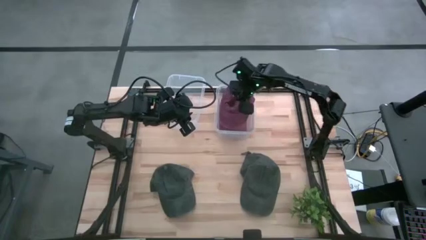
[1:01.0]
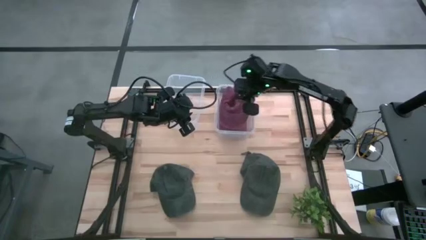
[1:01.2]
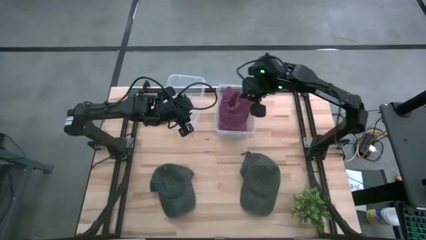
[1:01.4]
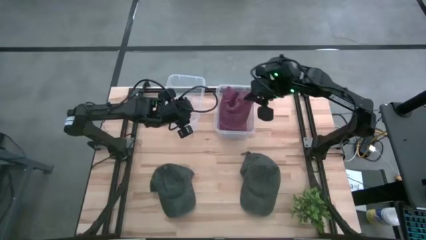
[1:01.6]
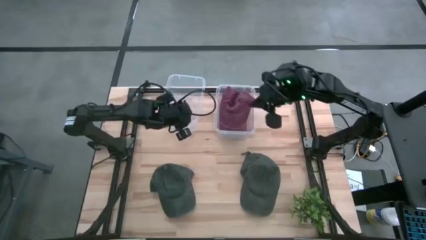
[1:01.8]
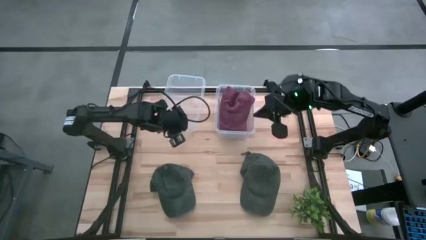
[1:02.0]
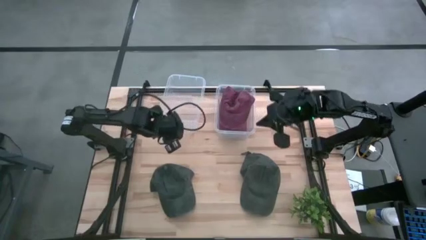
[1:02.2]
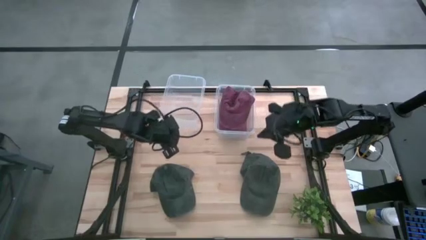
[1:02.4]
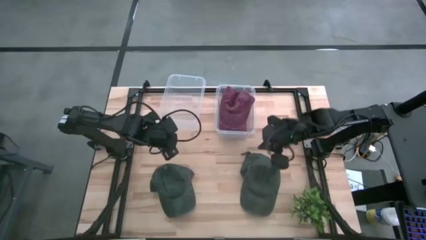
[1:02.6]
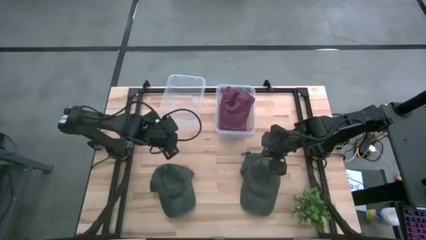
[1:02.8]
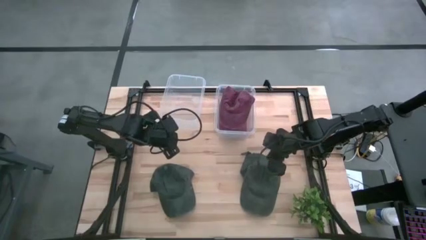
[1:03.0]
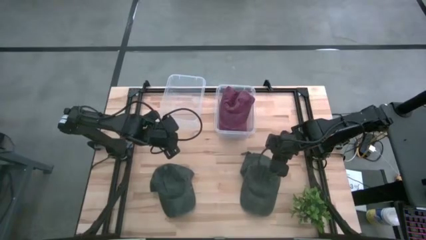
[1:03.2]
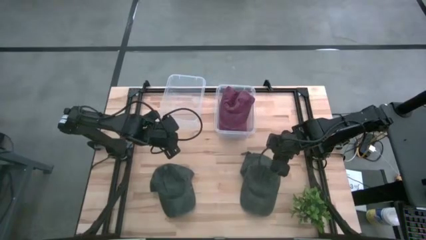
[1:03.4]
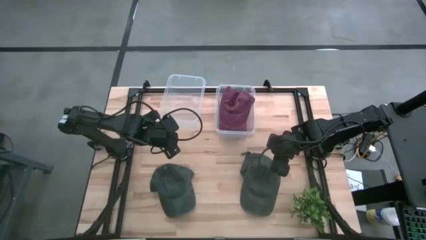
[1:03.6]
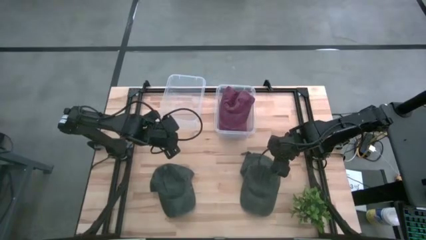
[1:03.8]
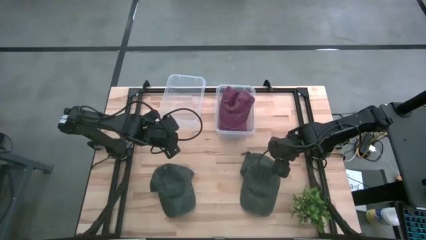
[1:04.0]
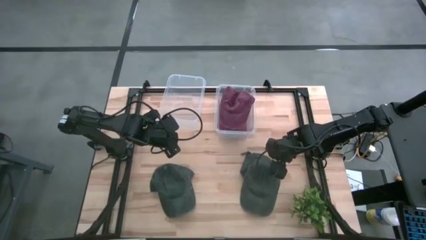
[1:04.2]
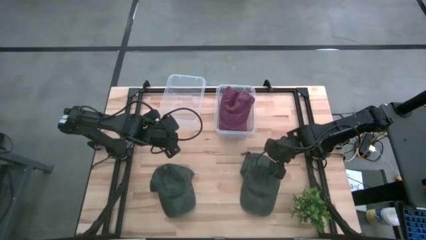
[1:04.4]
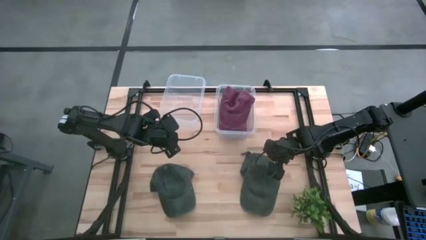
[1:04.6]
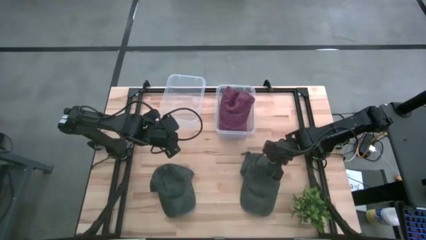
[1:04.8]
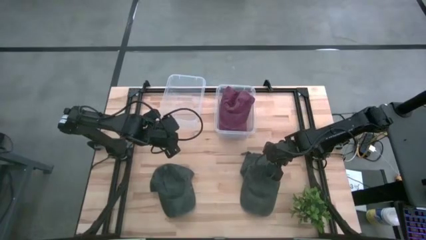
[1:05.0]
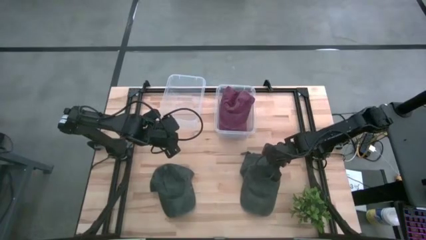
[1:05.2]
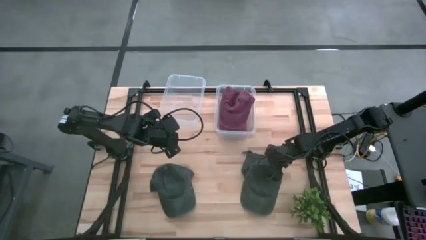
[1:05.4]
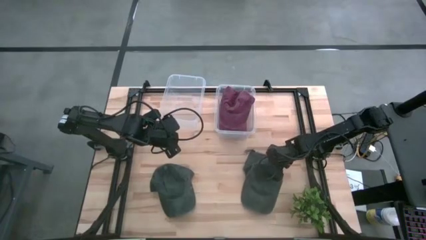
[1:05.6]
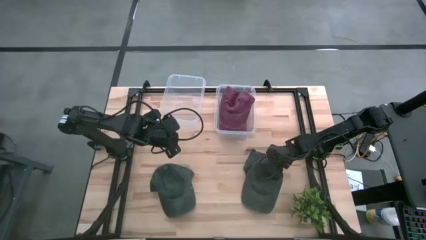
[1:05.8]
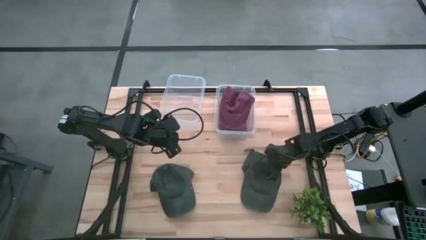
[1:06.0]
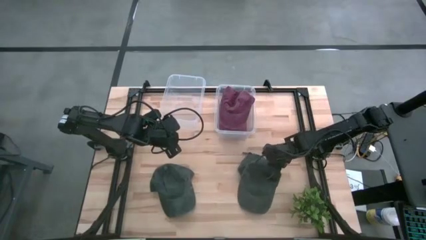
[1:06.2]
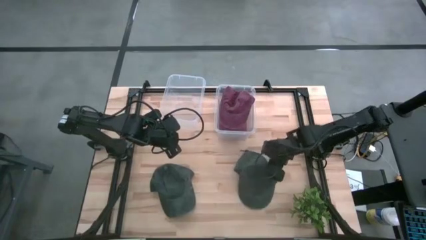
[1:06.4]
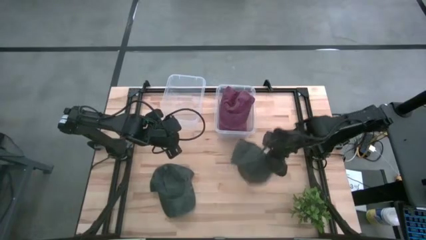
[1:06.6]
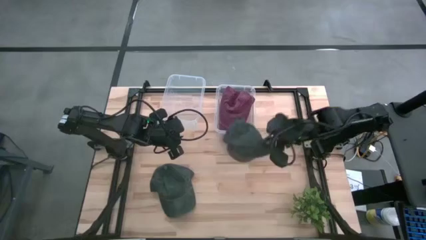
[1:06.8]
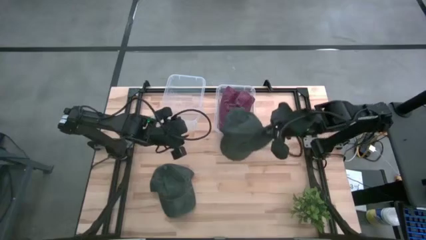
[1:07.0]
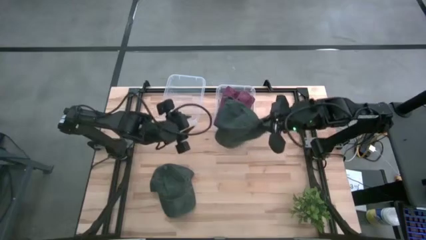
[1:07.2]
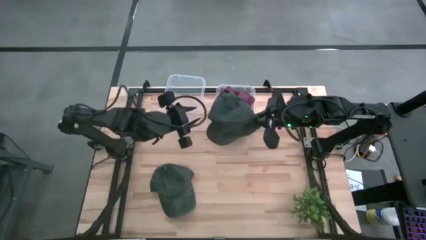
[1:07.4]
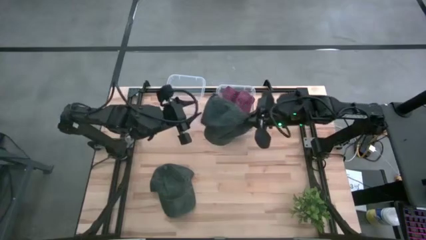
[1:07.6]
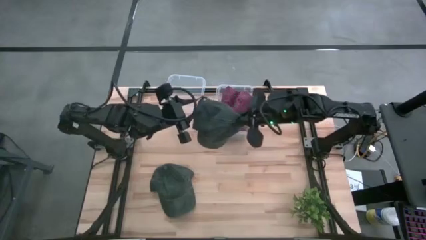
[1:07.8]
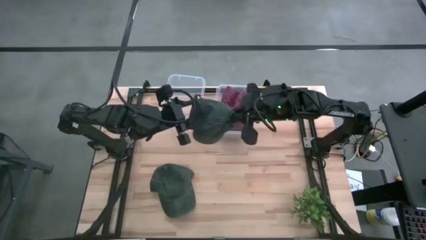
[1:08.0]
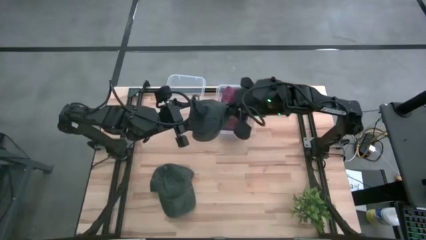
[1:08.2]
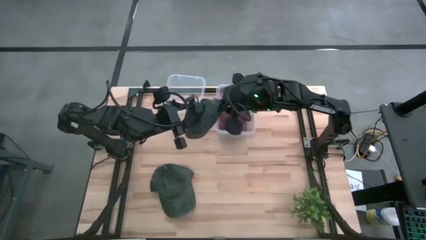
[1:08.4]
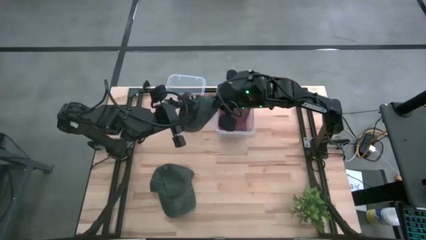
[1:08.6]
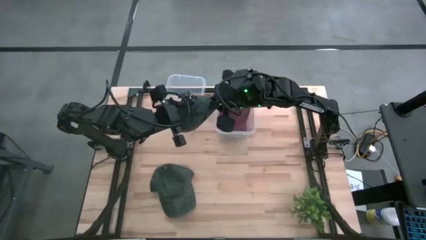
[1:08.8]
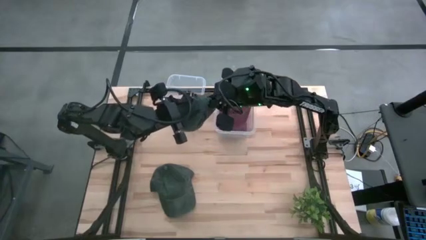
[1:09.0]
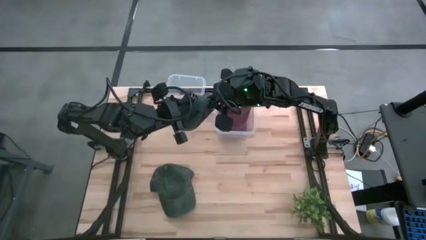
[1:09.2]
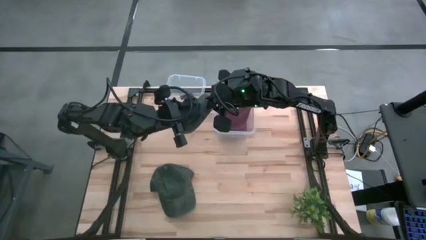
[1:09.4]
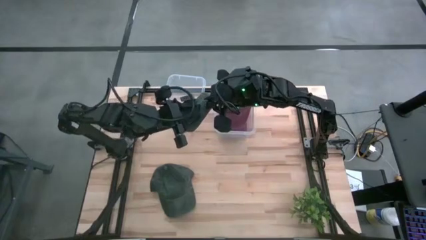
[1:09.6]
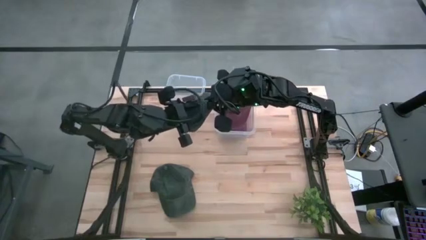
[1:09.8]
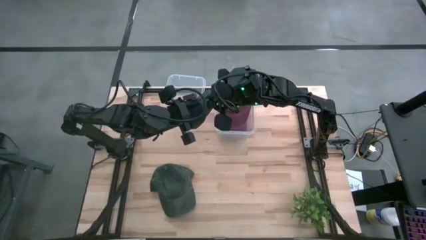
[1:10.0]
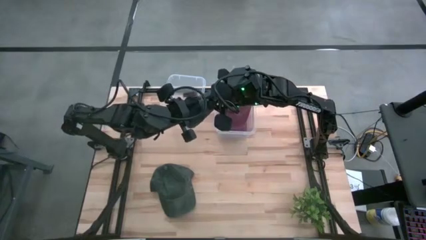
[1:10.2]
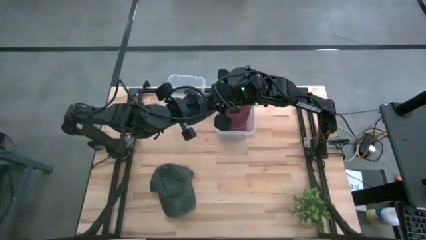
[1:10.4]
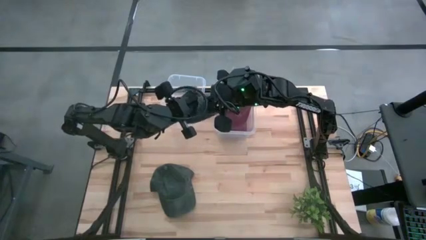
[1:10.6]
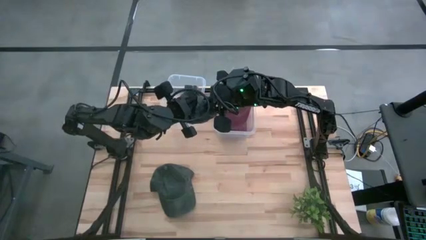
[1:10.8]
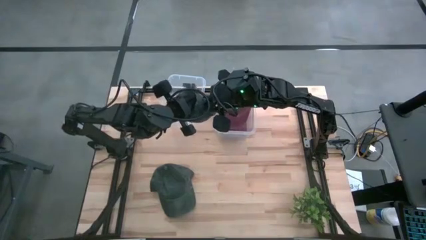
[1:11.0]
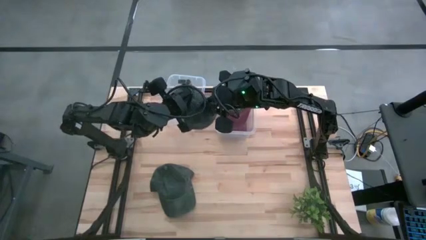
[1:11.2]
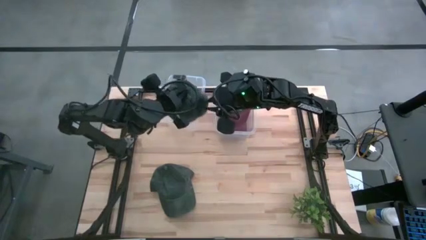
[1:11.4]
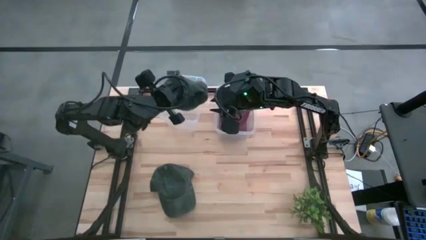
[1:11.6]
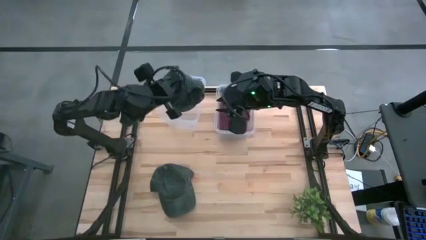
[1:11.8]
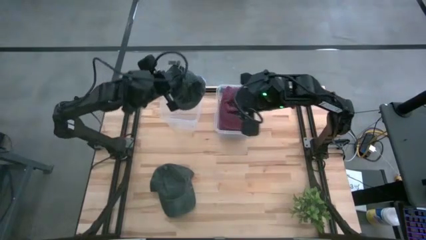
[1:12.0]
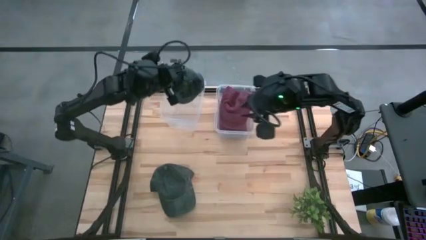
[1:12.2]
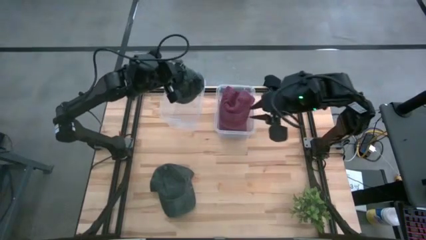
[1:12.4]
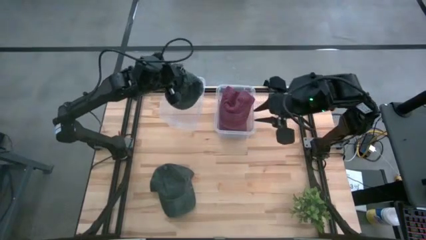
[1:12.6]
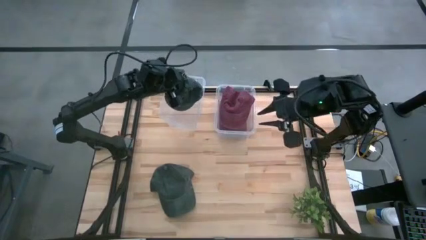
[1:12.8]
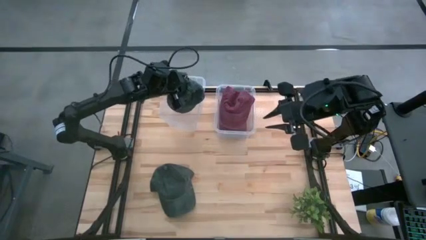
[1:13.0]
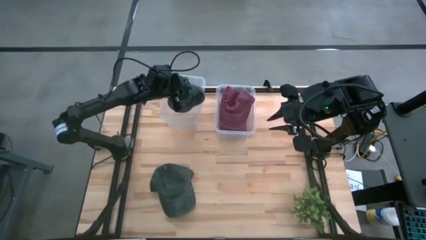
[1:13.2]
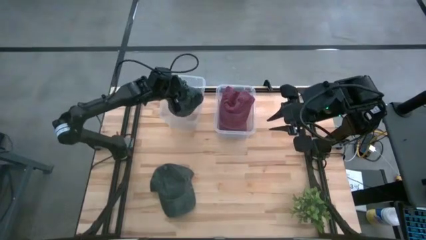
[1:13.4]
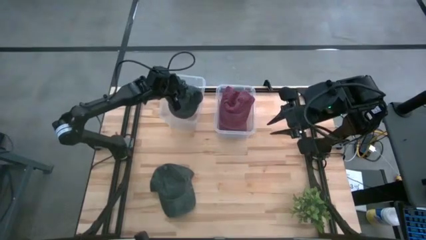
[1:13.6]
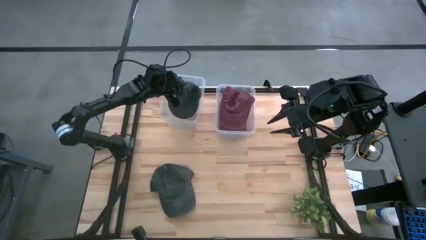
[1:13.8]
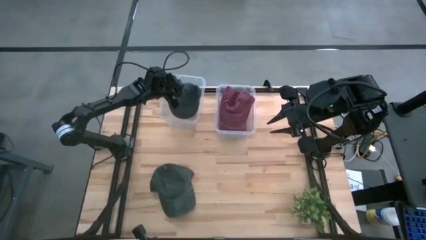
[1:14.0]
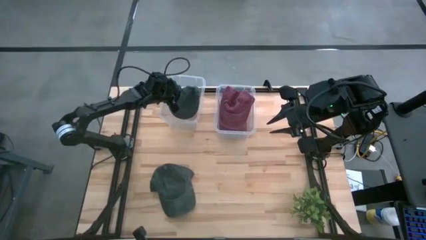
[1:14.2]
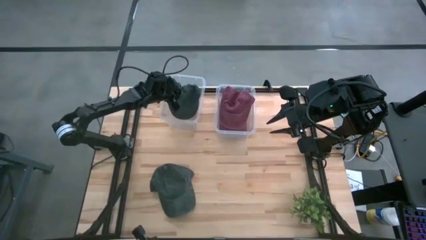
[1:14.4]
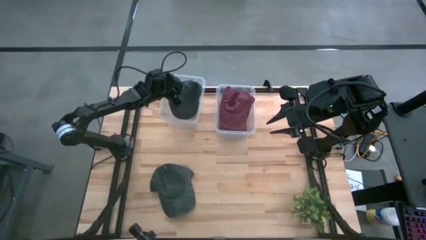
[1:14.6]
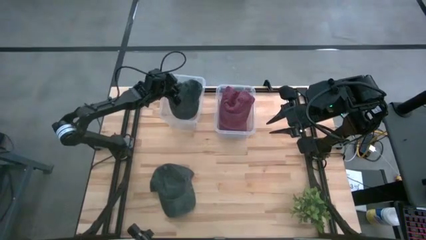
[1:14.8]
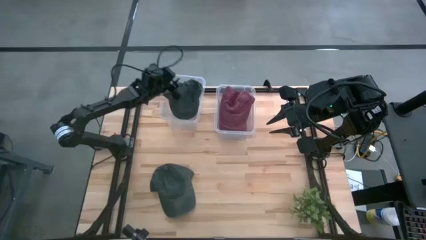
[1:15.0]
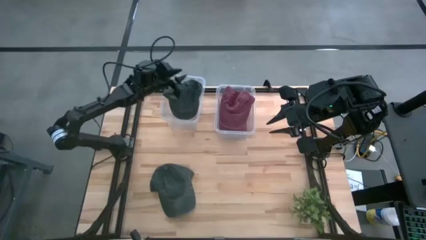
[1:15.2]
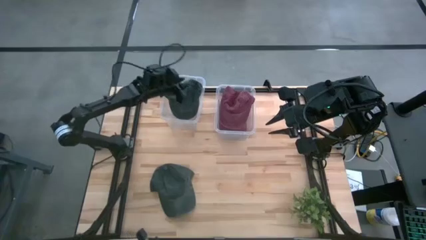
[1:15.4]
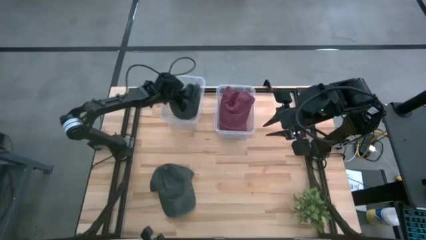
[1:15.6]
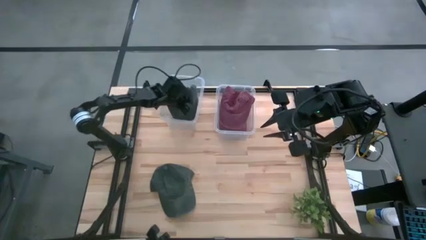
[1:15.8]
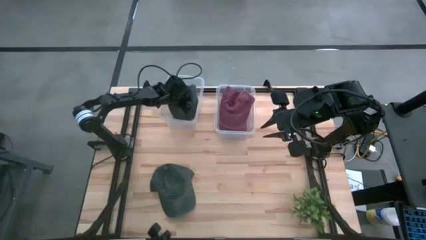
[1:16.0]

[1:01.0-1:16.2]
Task: Pick & Place hat
Put the right gray cap into the left transparent bin
